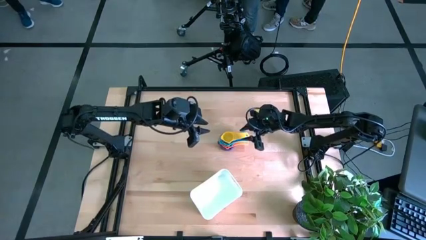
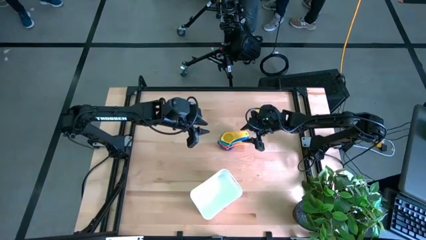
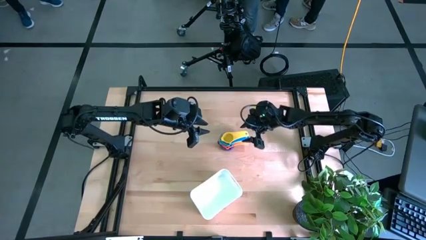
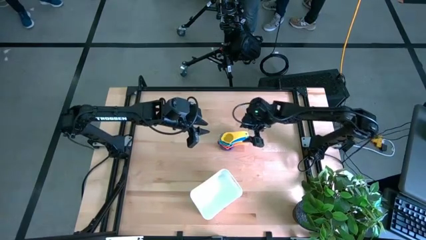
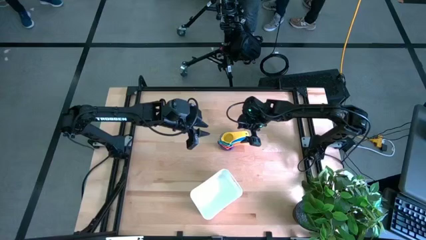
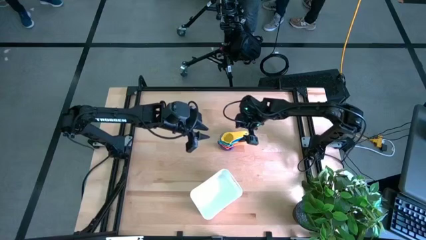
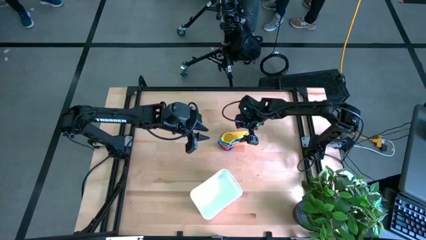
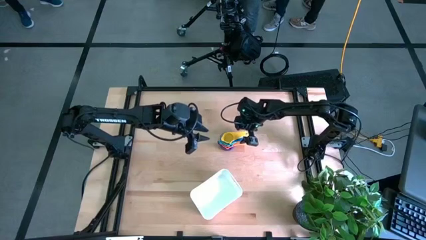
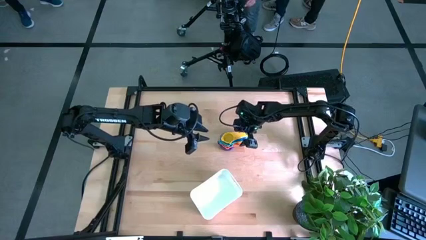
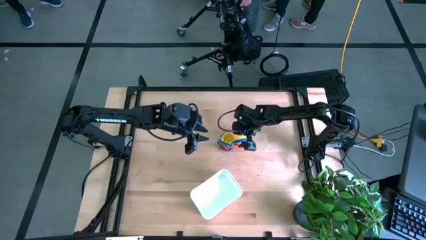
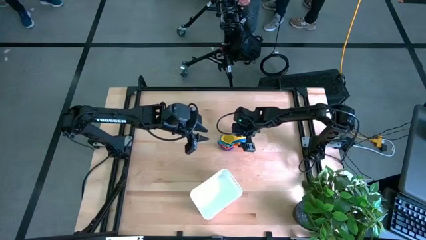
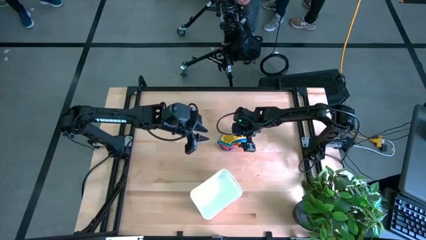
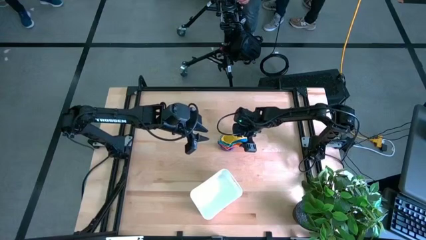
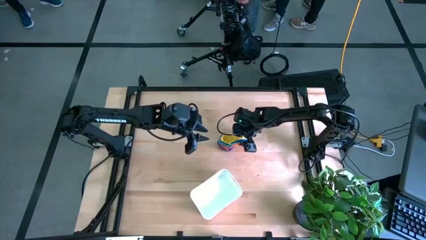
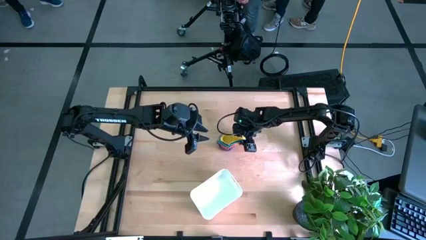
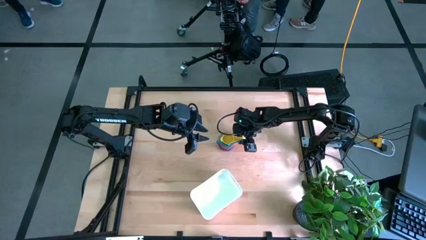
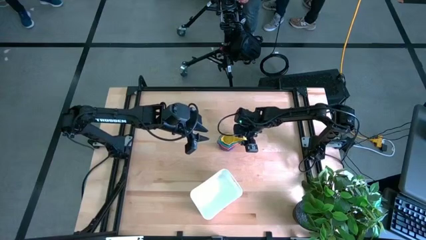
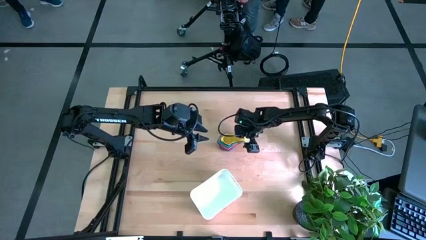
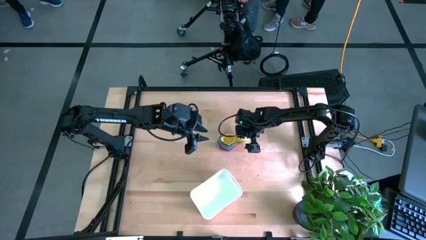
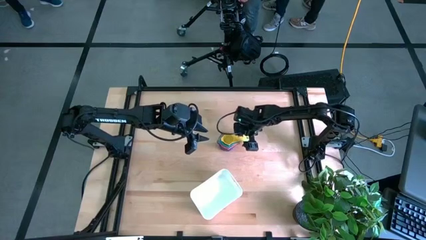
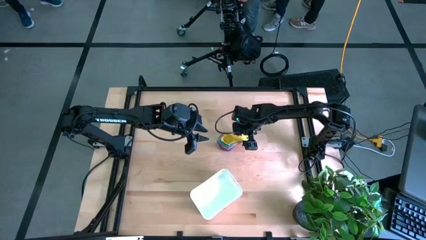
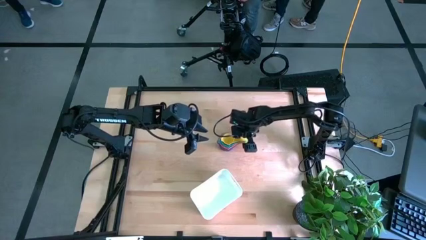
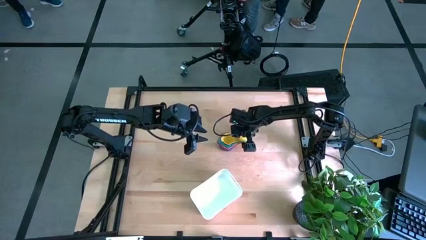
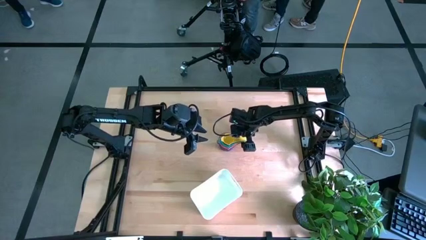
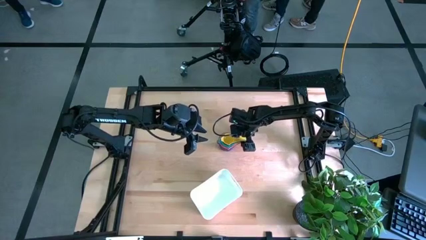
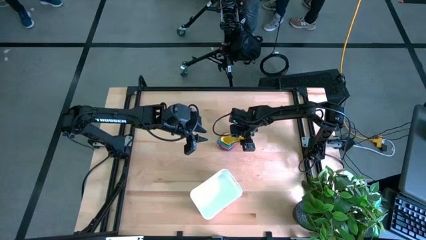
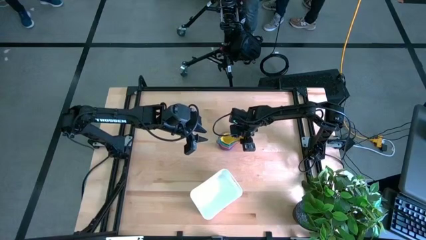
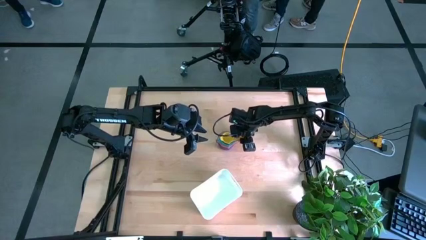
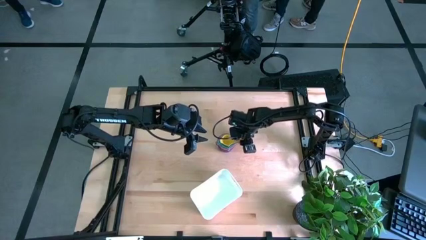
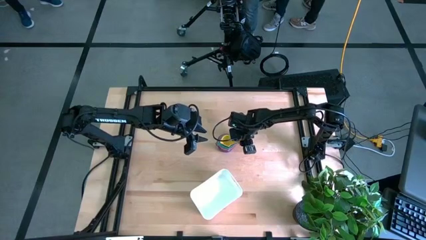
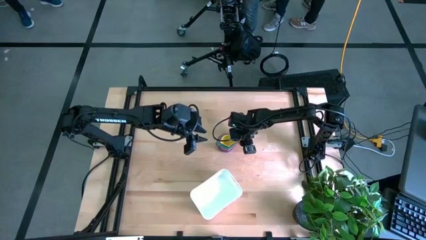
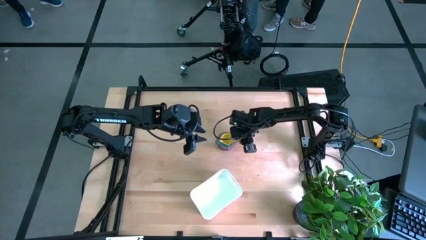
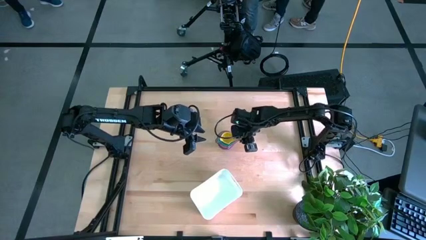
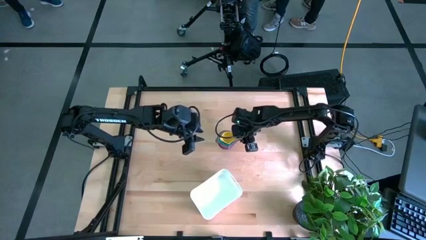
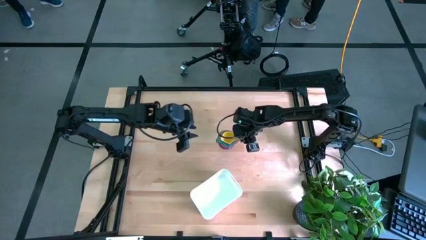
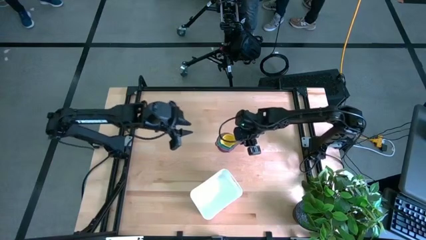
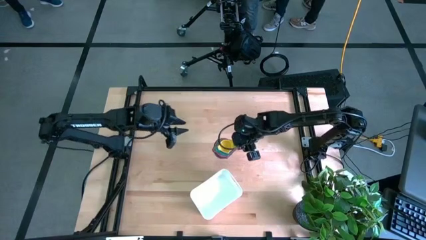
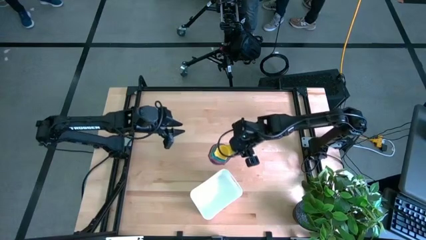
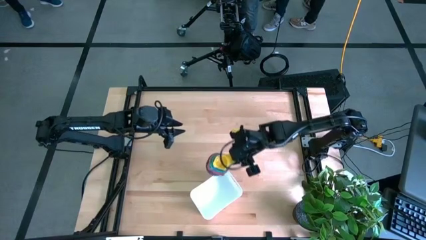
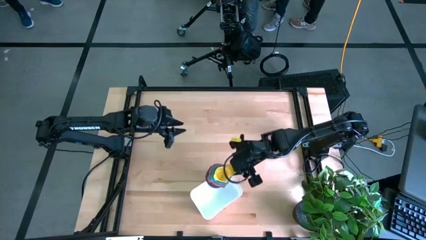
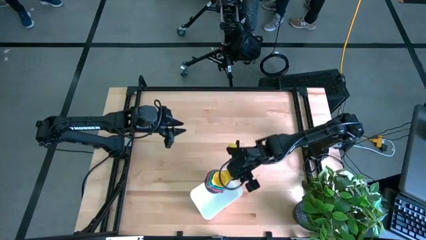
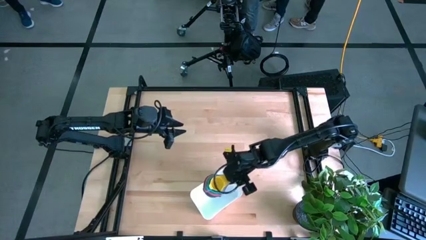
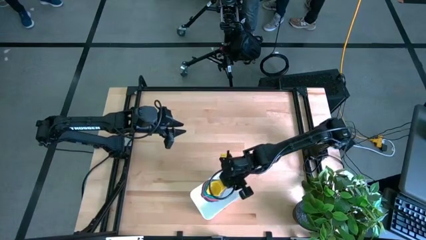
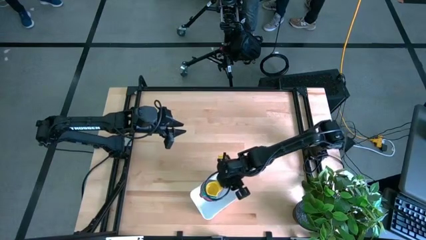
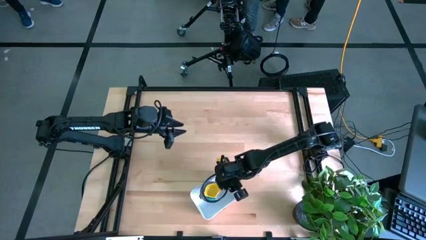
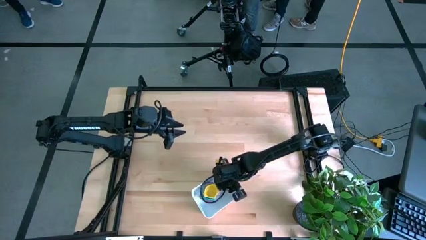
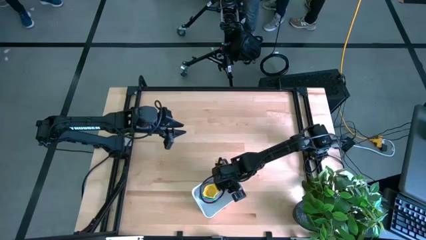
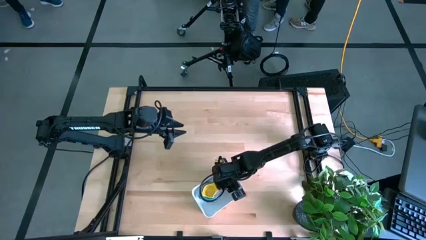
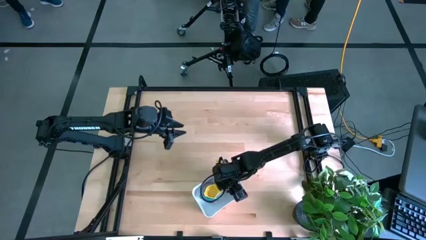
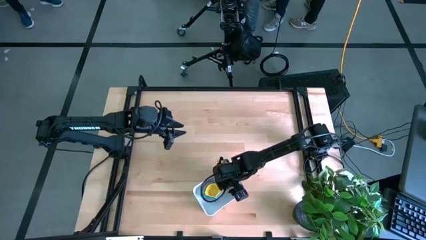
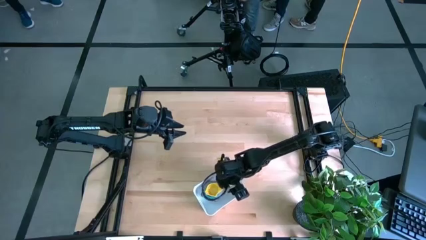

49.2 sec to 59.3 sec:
Task: Nest measuring cups in basket
Put the measuring cups into the bin

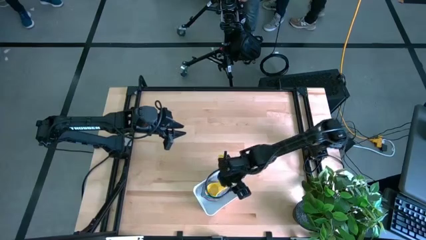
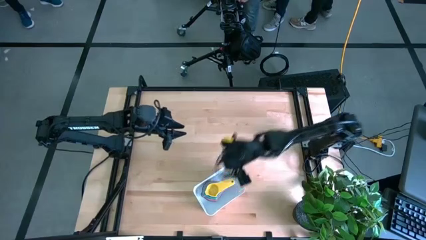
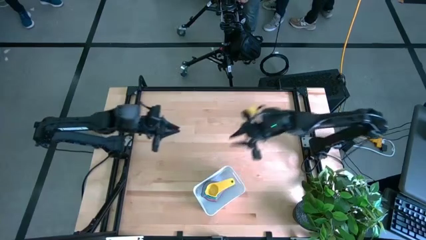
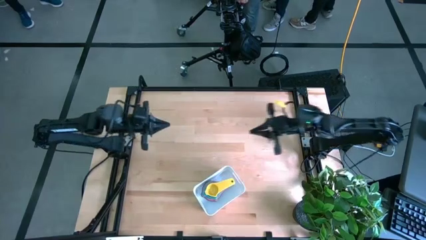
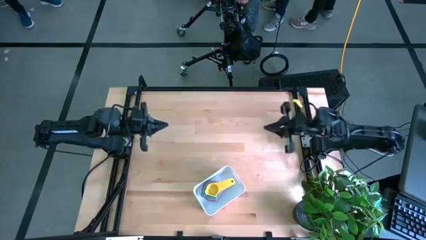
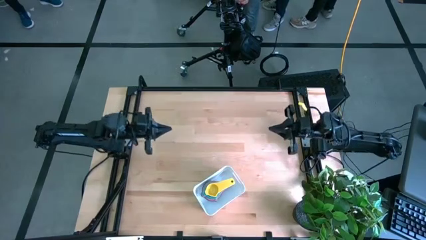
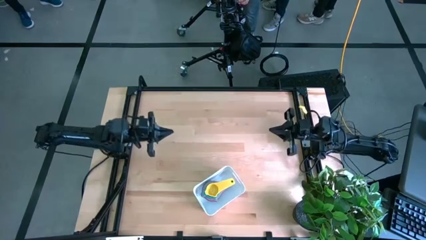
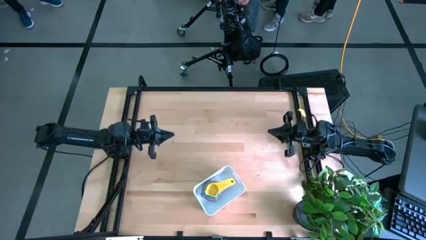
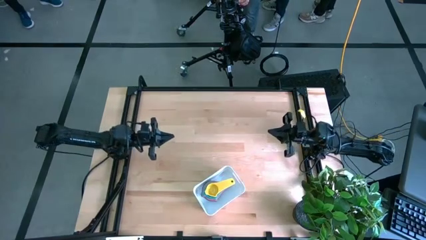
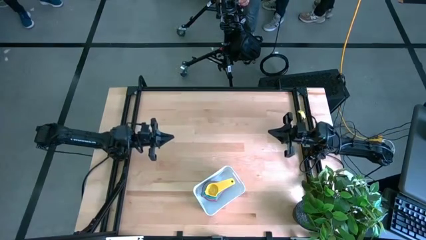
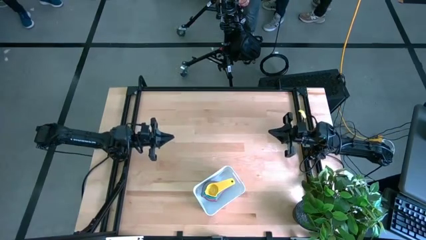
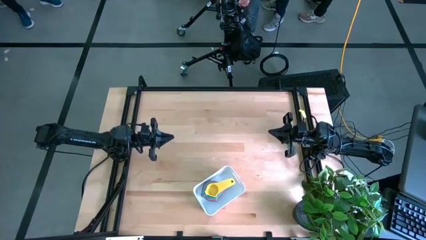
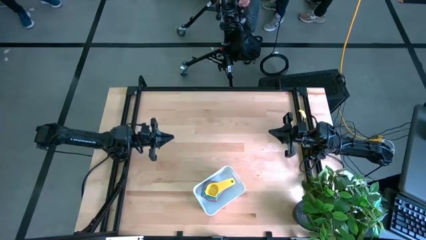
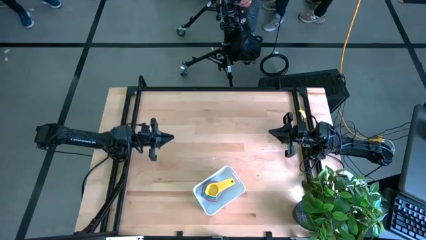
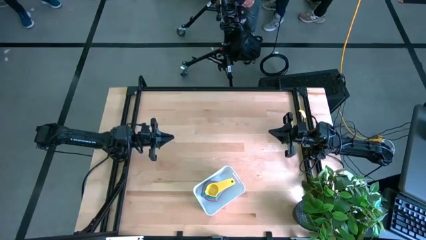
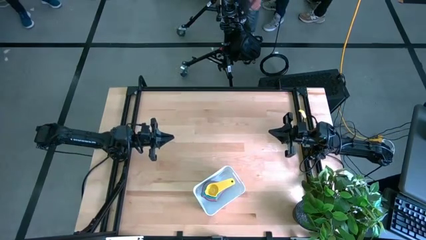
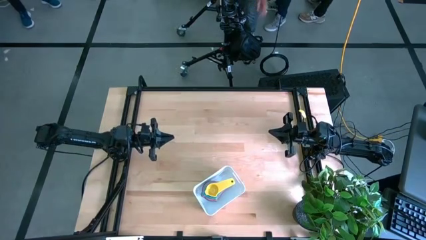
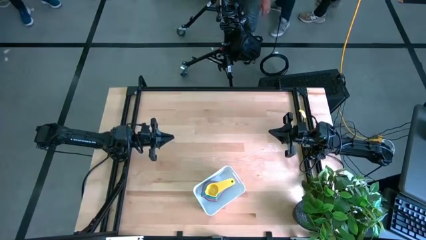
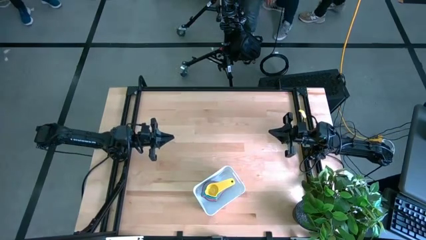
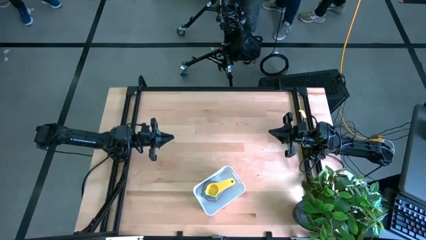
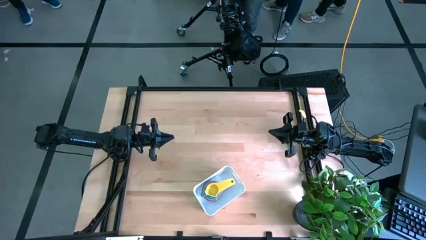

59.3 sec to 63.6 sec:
Return to Home Position

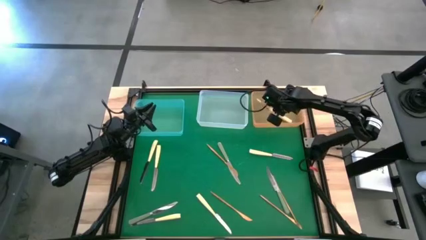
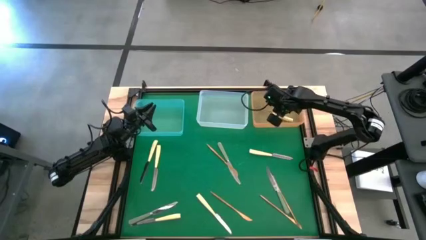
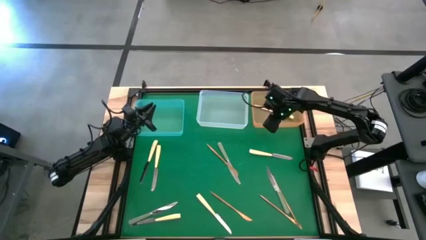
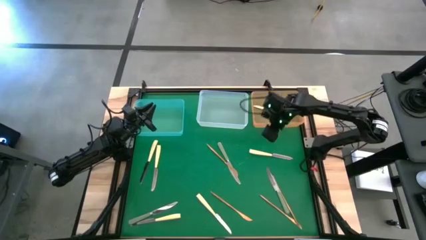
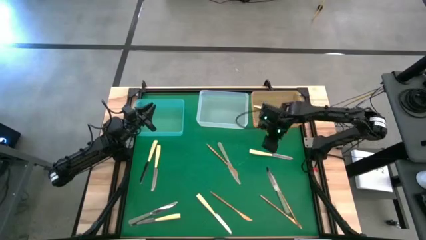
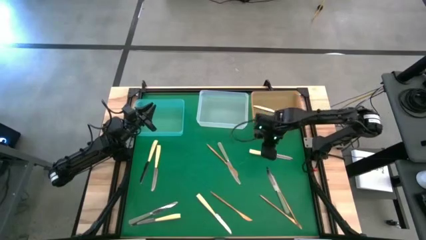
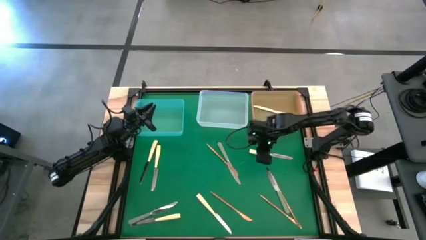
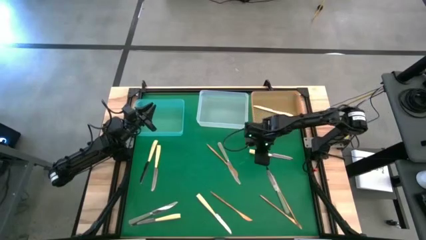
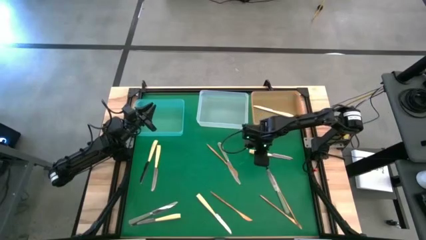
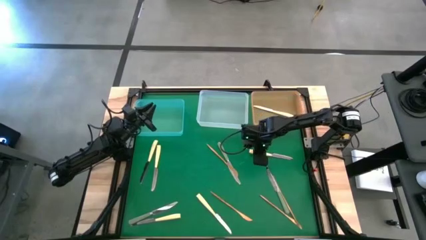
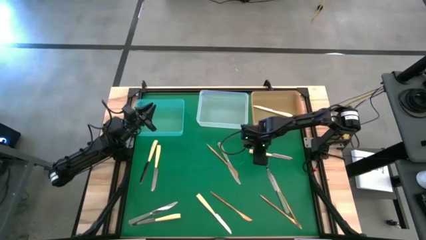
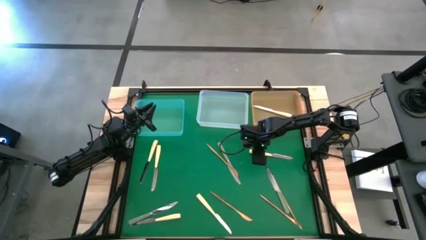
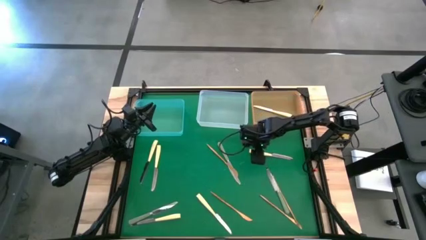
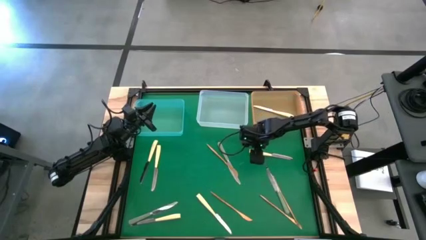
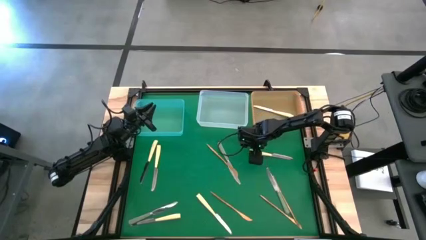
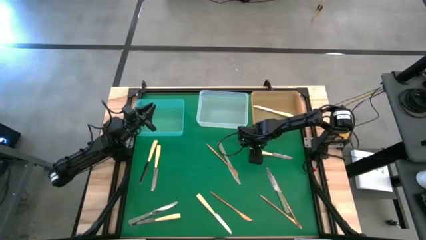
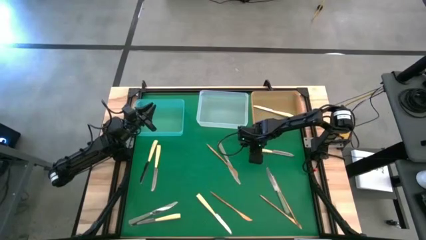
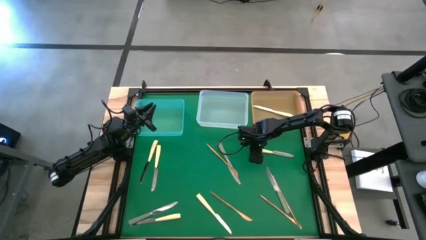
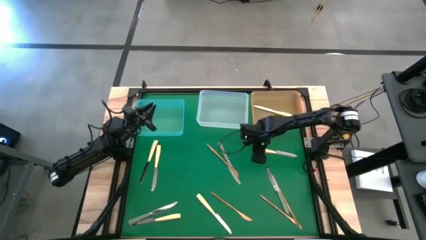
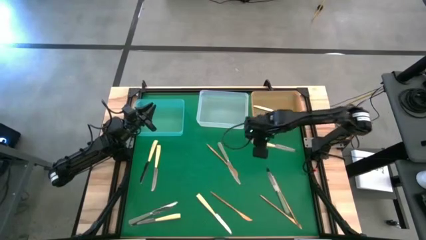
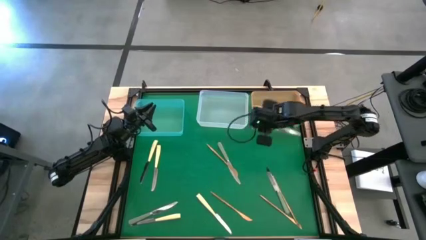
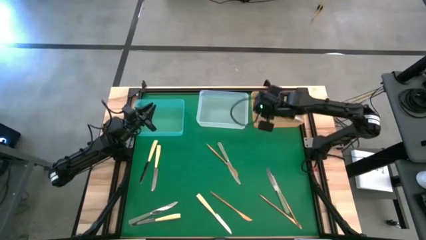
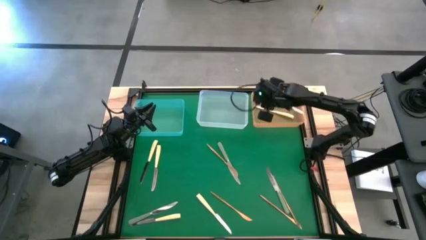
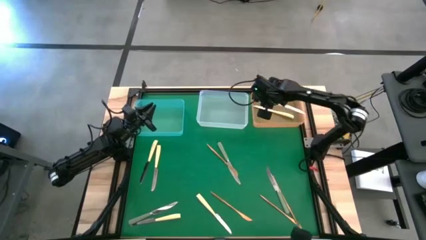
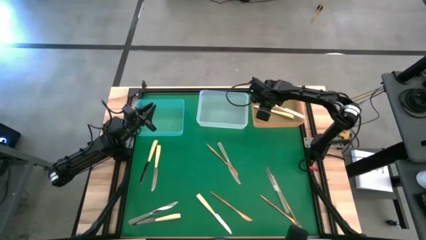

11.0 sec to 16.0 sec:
Task: Sort silverware by color (type)
Put the yellow knife into the orange bin
